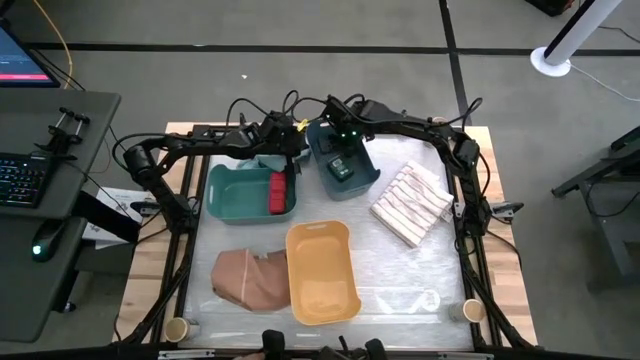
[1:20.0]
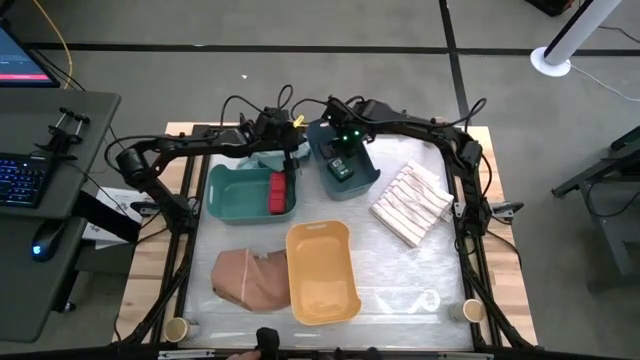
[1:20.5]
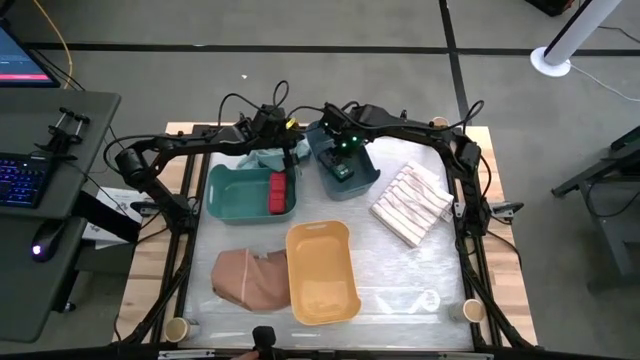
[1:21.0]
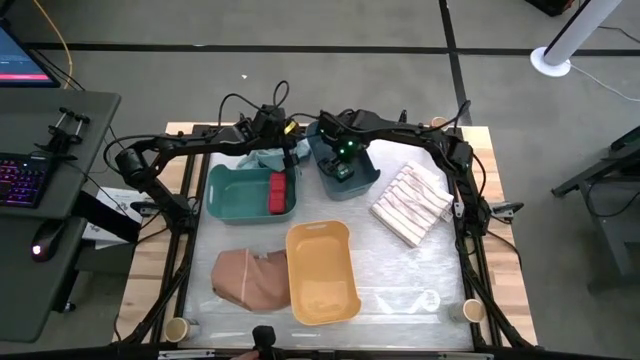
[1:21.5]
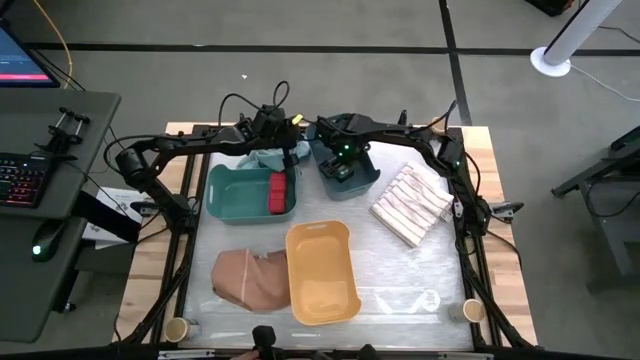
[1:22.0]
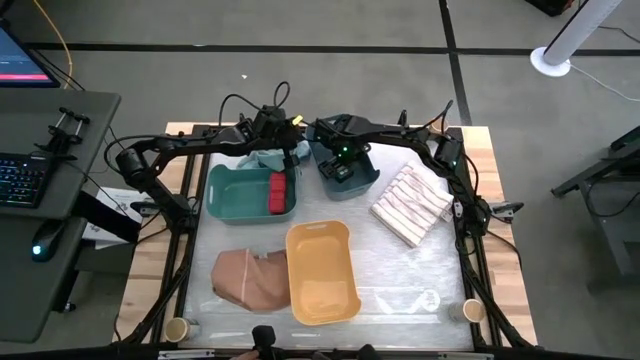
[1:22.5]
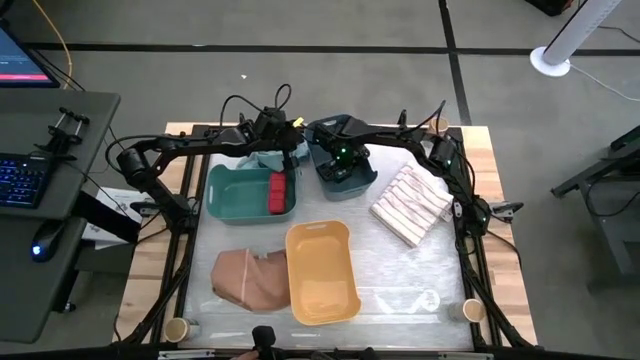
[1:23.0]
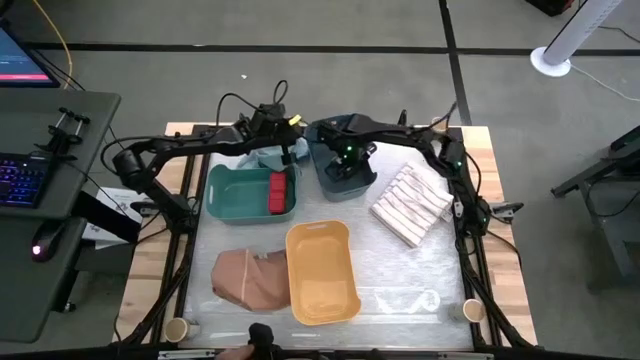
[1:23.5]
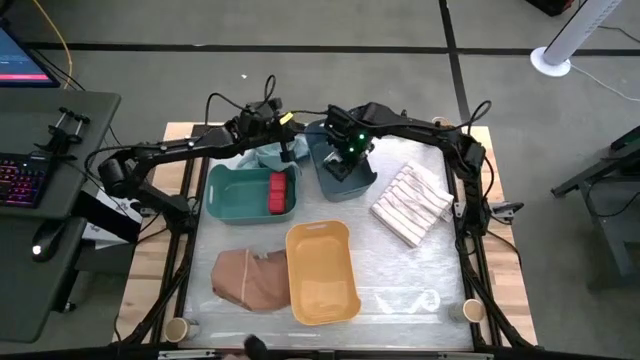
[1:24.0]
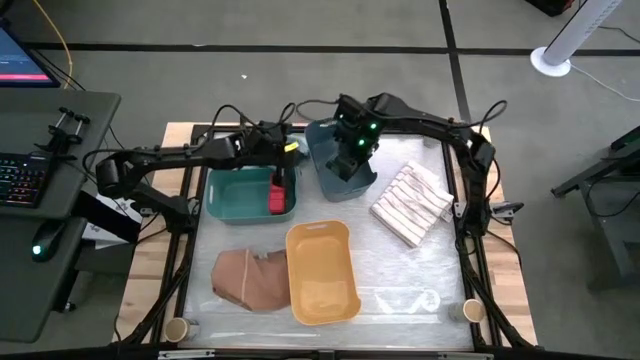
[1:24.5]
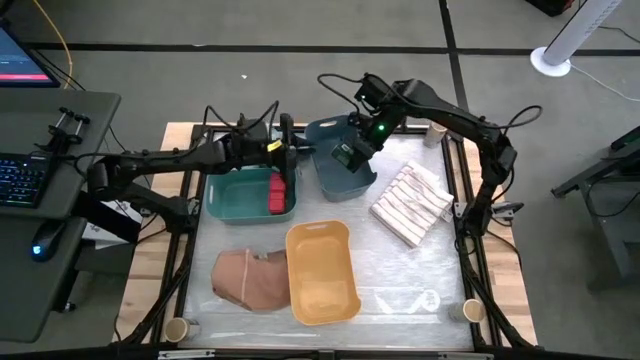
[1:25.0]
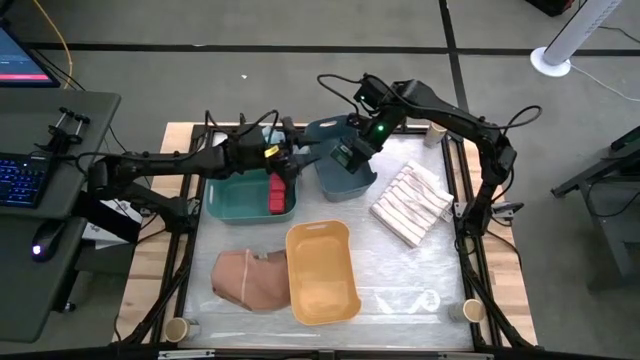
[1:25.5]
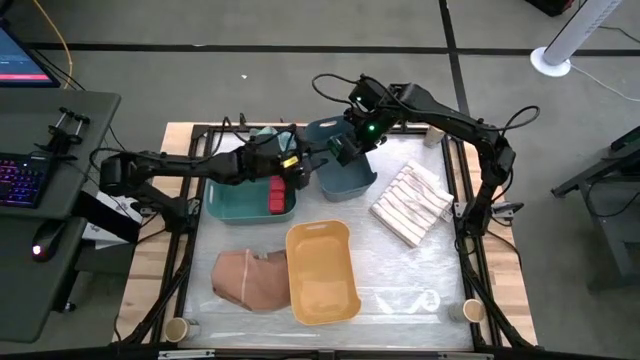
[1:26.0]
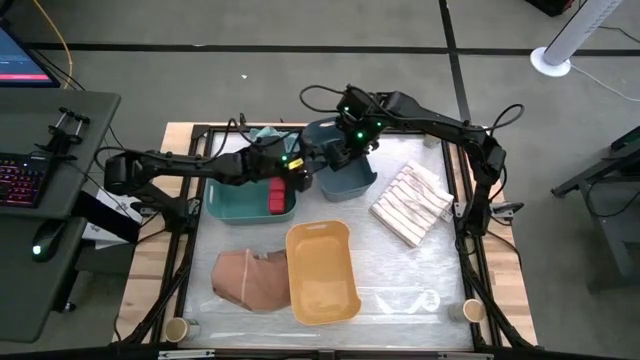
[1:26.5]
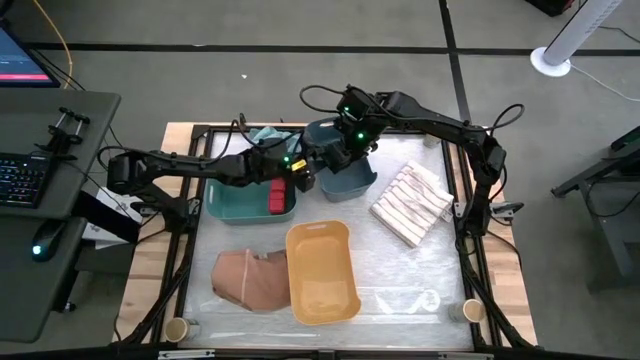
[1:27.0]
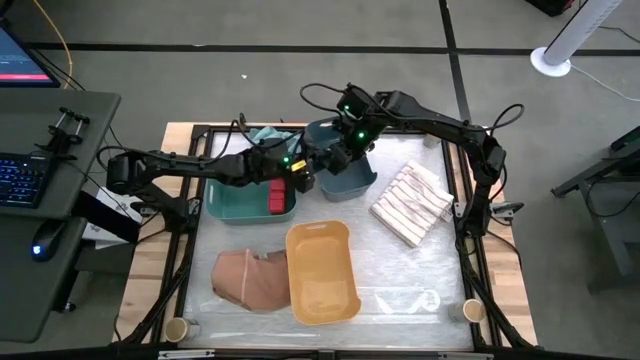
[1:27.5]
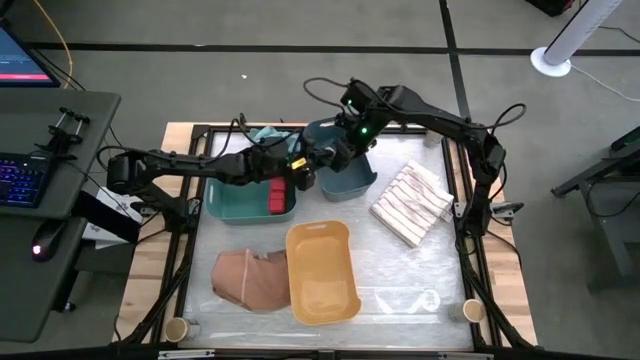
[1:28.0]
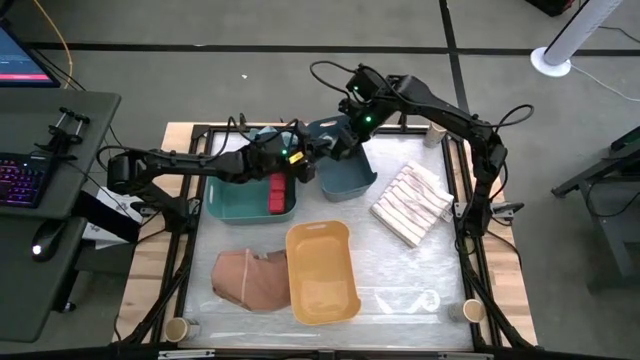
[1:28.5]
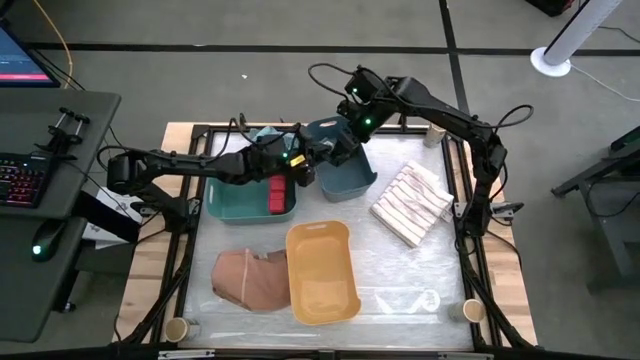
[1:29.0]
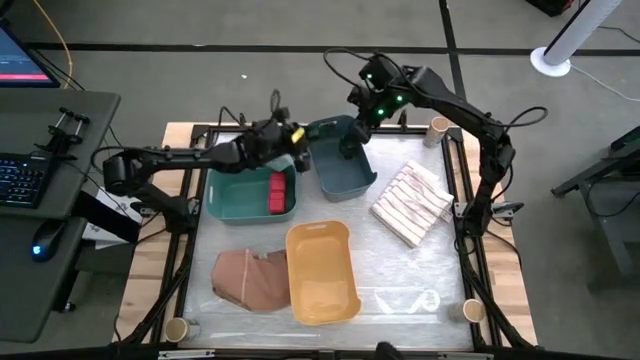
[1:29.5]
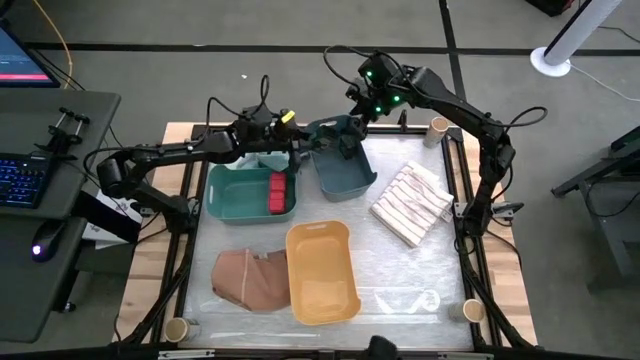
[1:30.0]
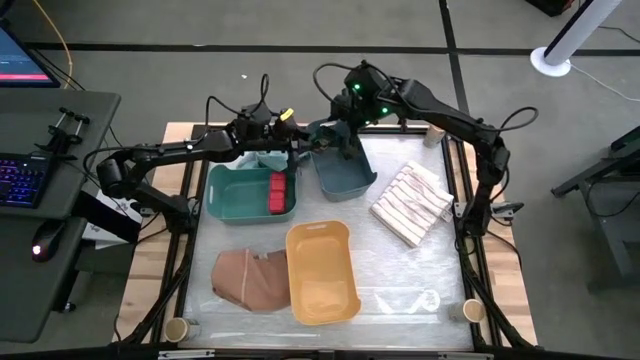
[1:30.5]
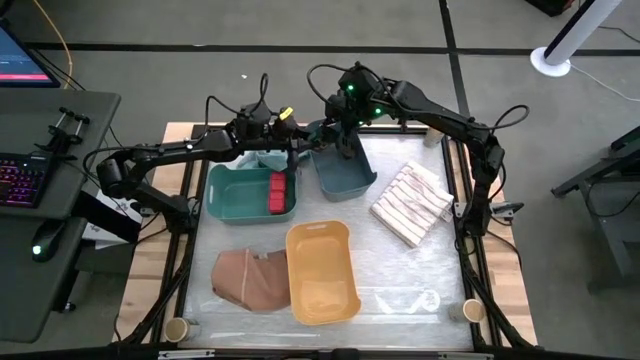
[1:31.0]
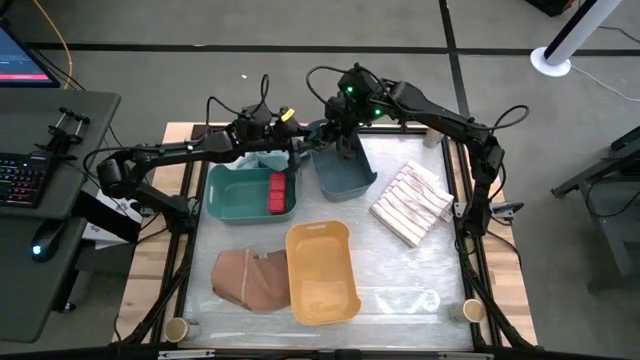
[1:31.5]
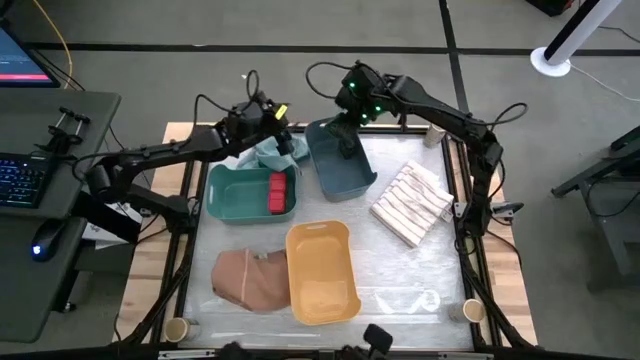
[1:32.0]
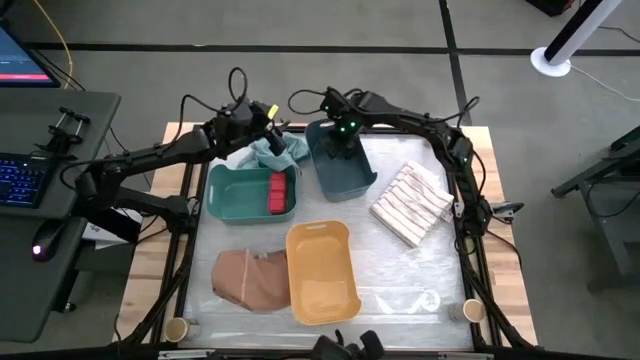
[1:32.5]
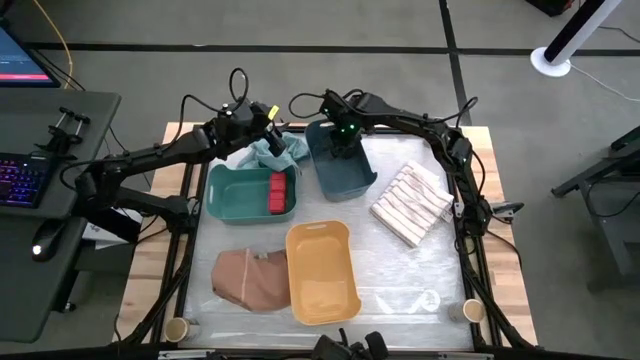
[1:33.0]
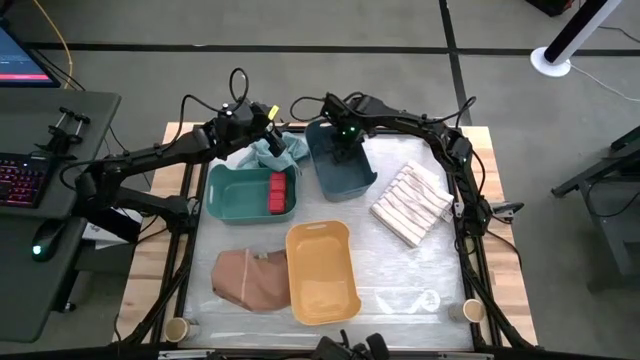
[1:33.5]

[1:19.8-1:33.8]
Task: Sort spices by type
Put the black seasoning can into the blue bin

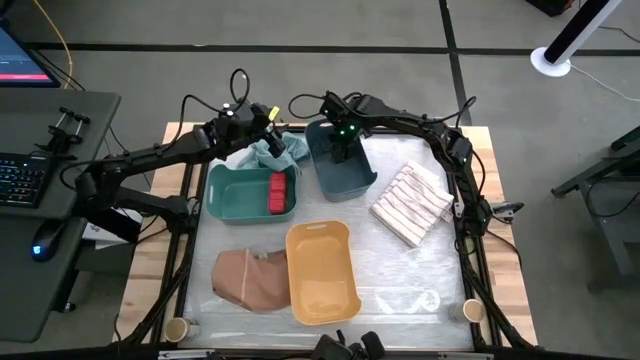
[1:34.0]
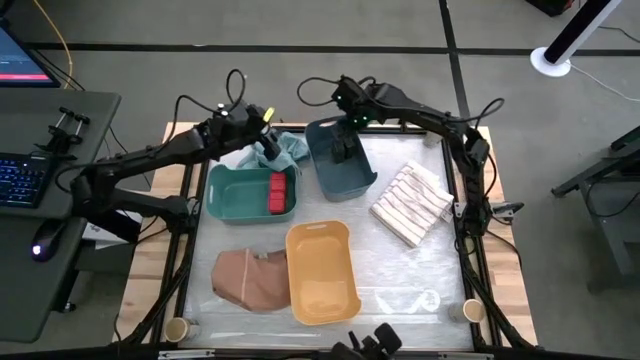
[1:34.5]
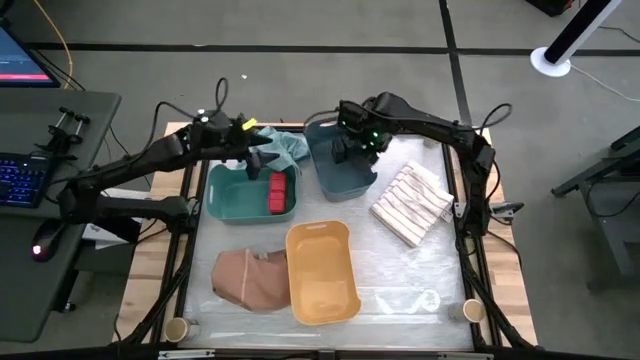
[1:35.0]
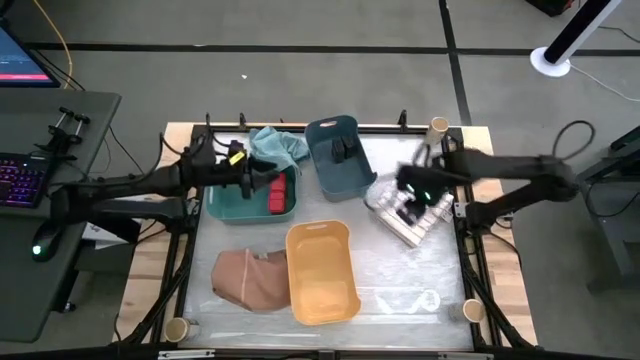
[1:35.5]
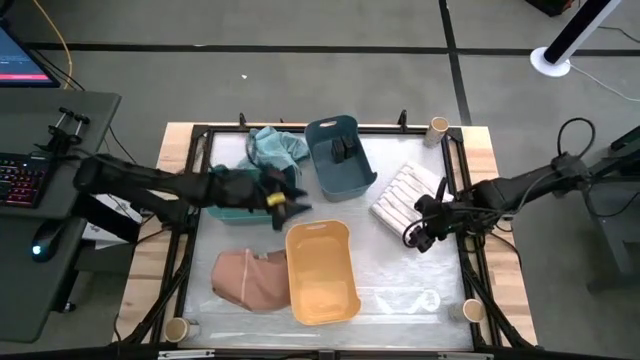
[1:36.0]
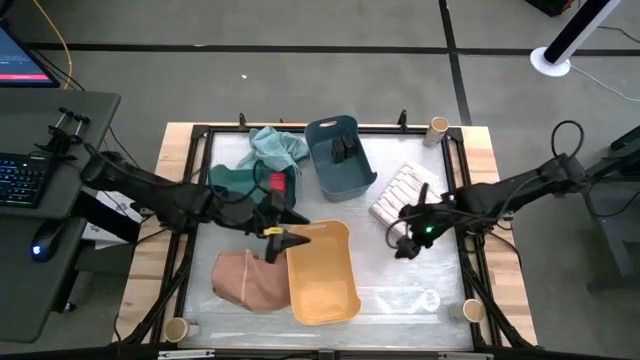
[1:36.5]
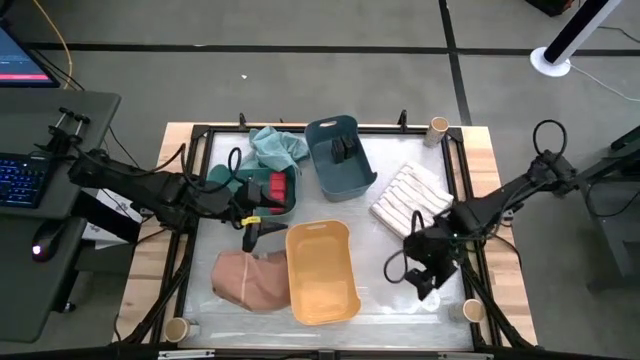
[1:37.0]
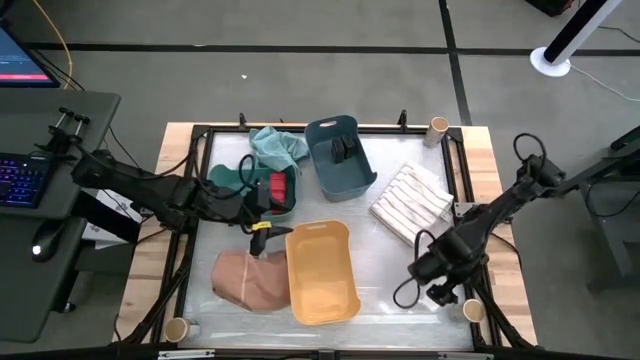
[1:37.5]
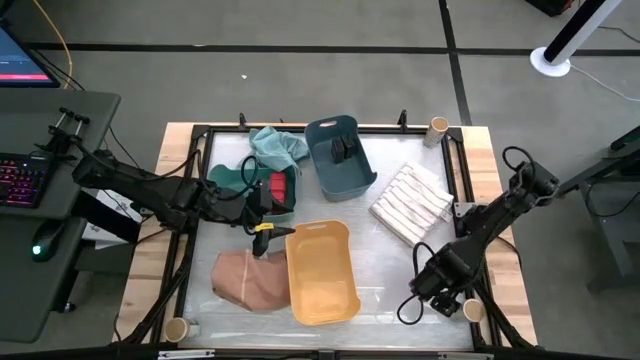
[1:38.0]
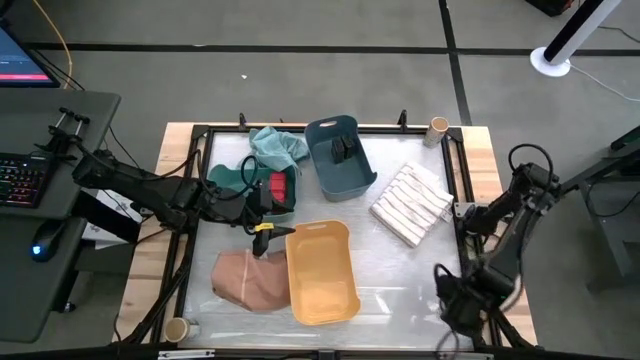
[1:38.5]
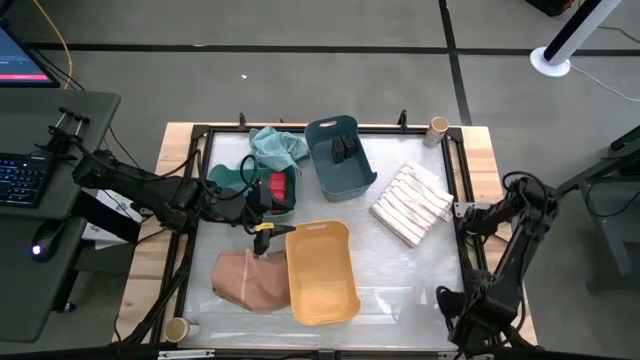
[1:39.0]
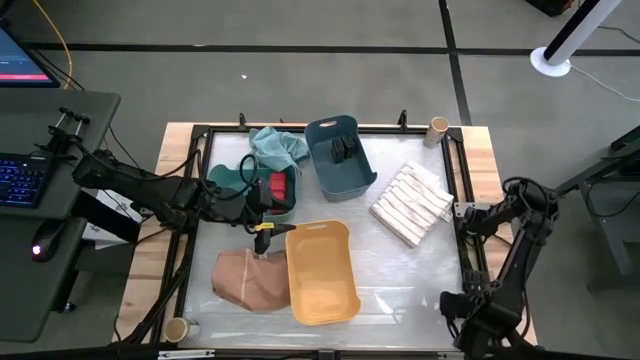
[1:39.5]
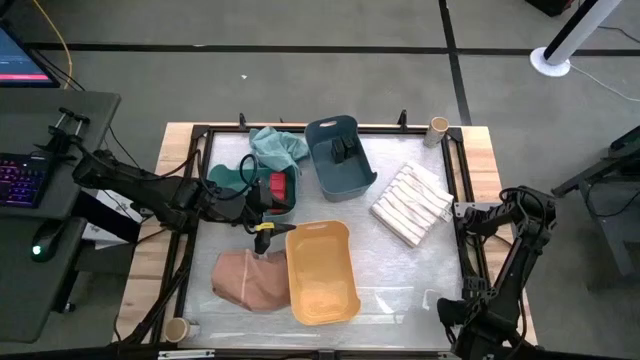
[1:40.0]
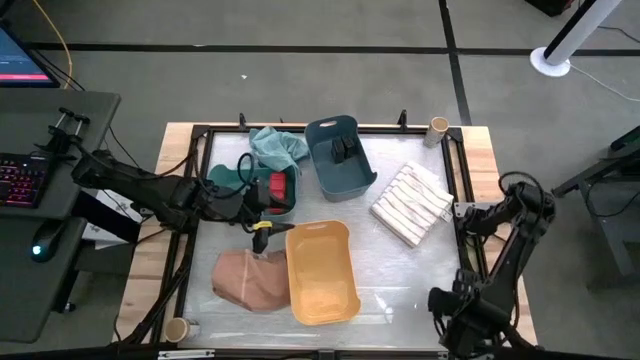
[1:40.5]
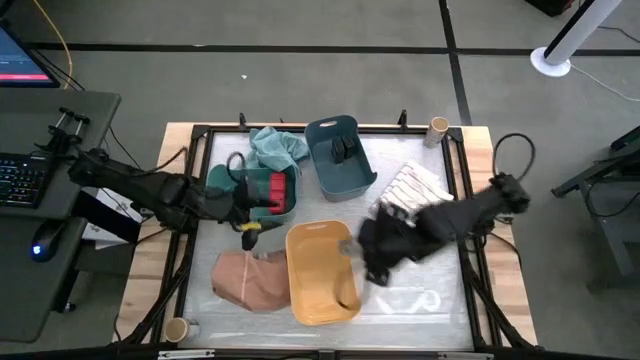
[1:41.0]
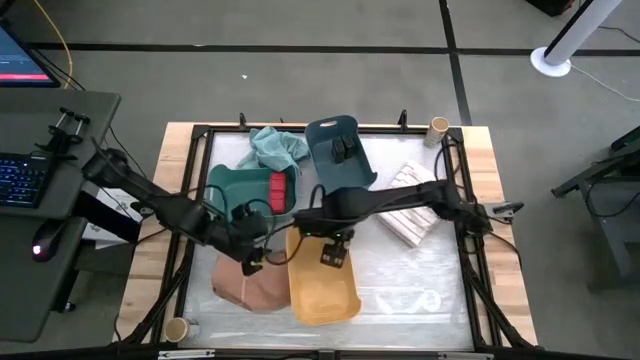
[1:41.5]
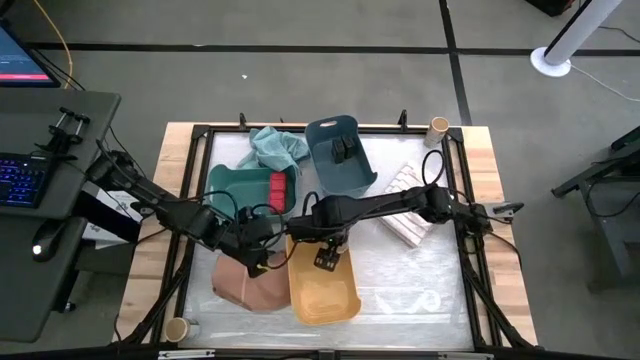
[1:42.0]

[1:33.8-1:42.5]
Put the bottom right gold seasoning bottle into the orange bin
